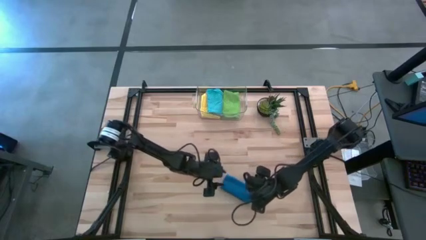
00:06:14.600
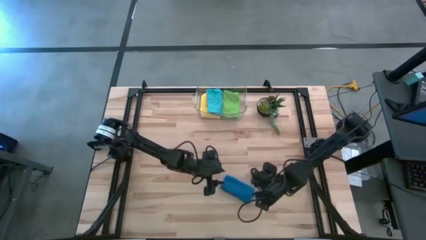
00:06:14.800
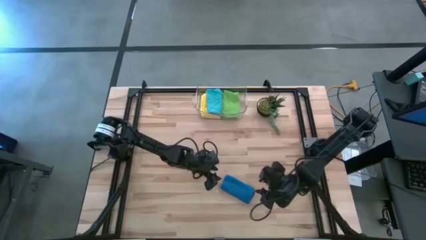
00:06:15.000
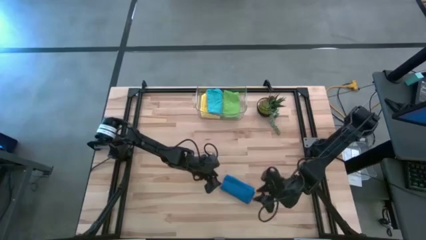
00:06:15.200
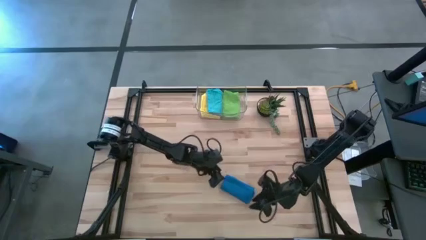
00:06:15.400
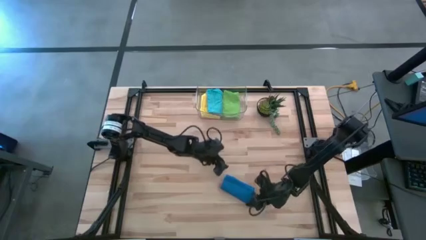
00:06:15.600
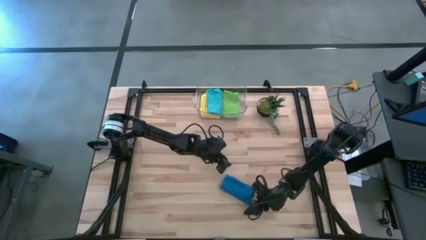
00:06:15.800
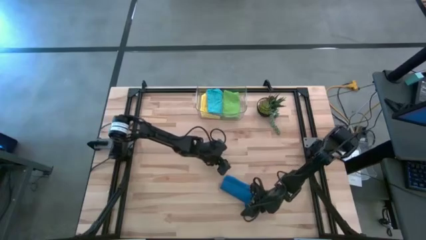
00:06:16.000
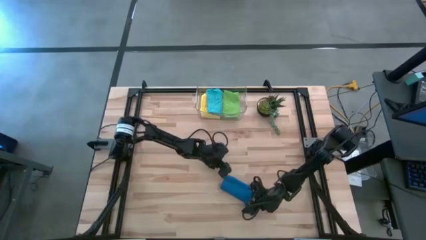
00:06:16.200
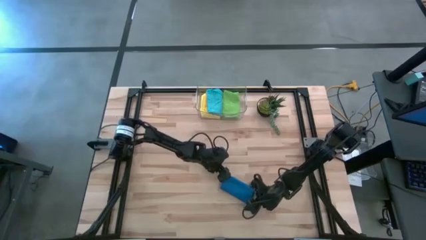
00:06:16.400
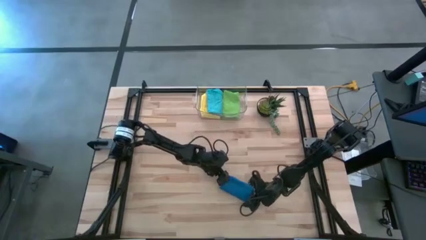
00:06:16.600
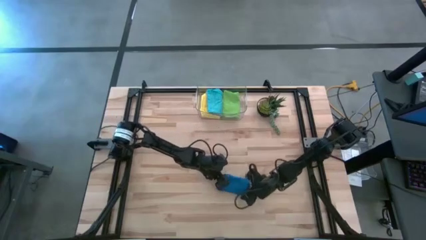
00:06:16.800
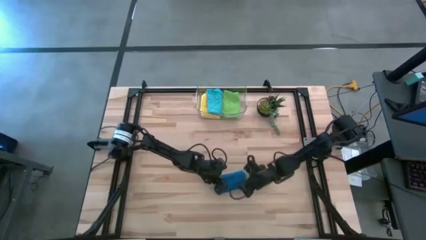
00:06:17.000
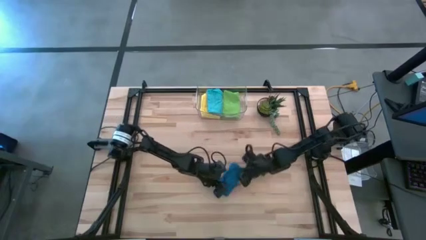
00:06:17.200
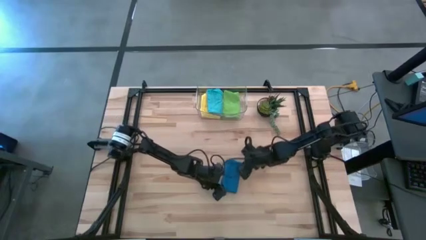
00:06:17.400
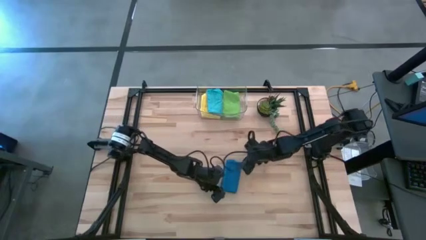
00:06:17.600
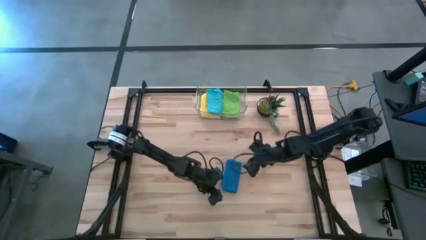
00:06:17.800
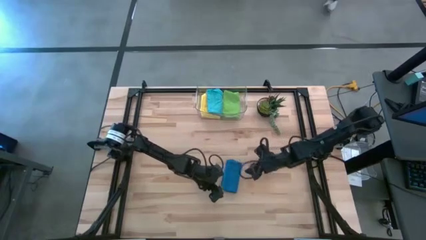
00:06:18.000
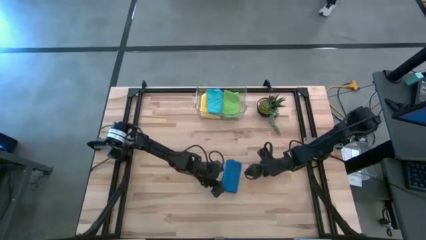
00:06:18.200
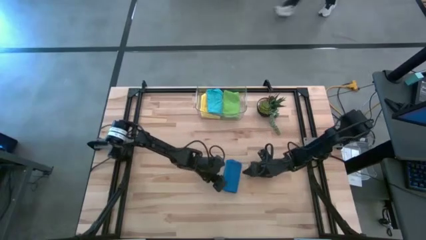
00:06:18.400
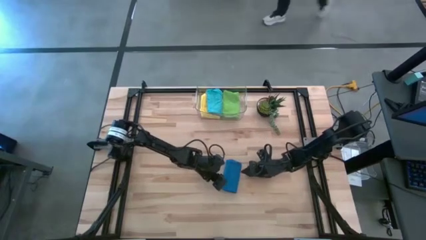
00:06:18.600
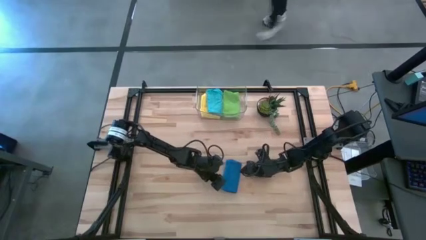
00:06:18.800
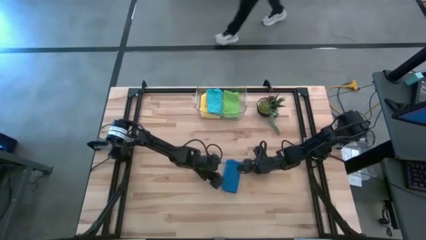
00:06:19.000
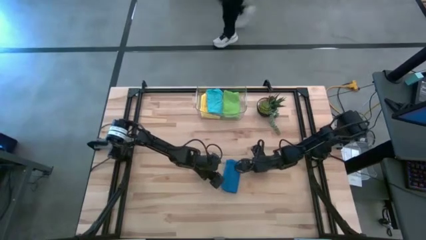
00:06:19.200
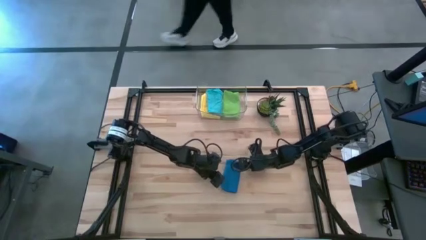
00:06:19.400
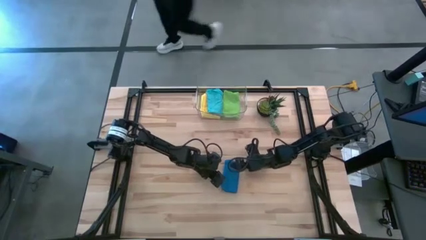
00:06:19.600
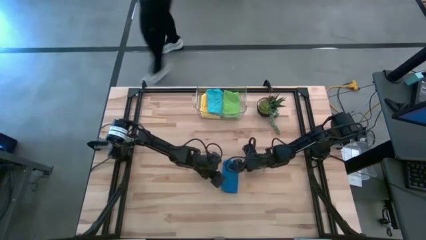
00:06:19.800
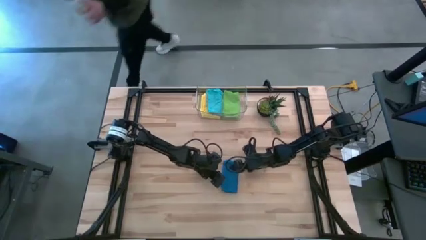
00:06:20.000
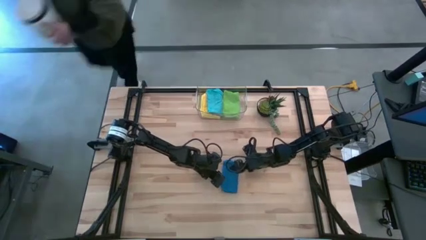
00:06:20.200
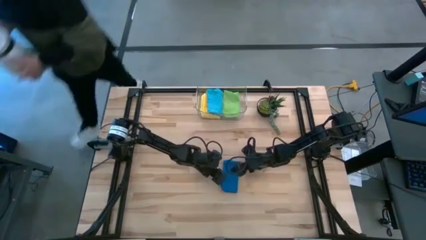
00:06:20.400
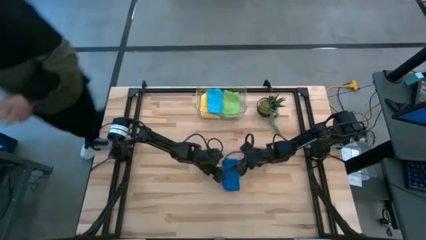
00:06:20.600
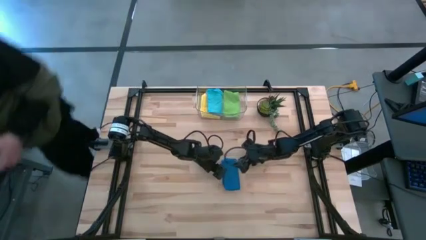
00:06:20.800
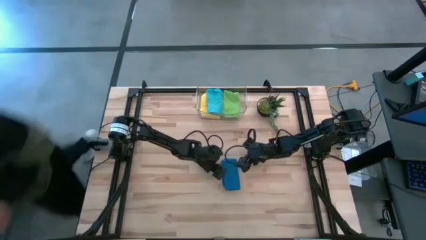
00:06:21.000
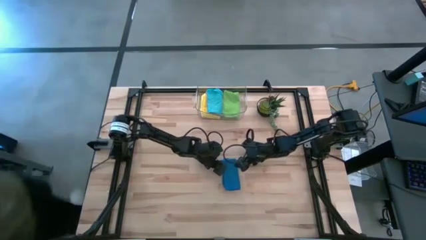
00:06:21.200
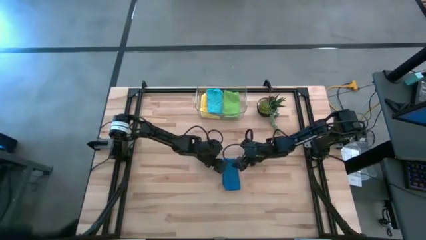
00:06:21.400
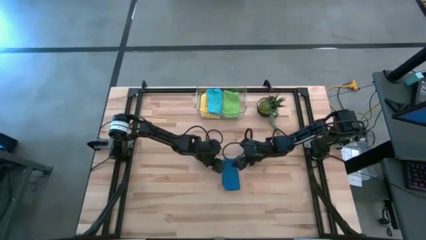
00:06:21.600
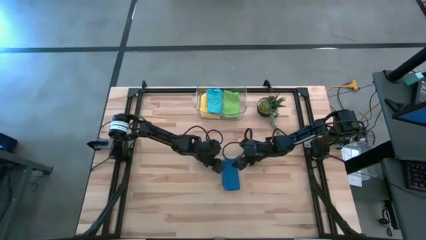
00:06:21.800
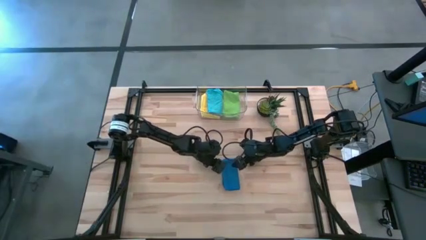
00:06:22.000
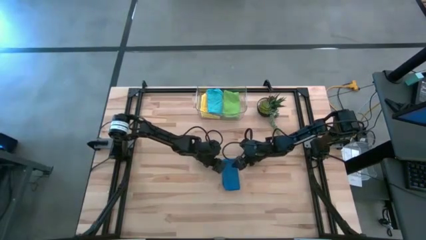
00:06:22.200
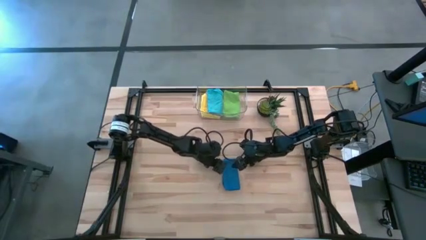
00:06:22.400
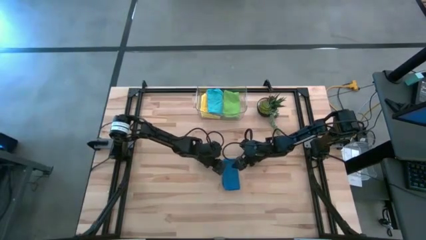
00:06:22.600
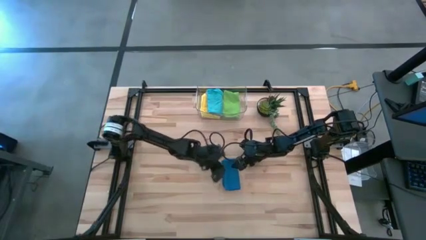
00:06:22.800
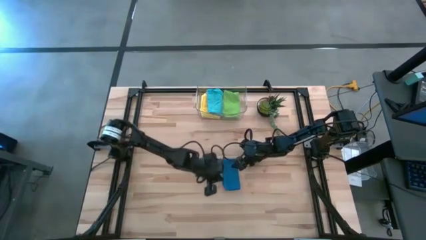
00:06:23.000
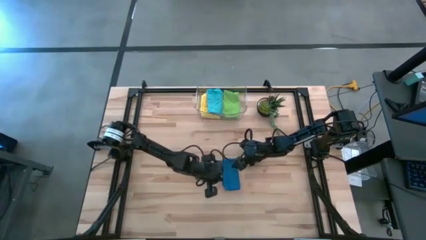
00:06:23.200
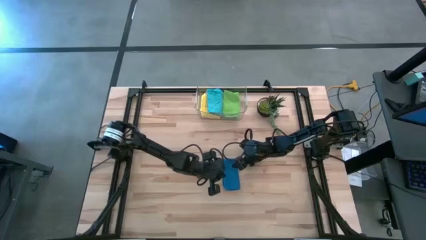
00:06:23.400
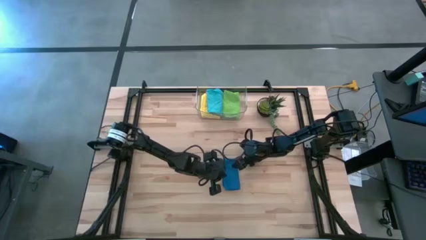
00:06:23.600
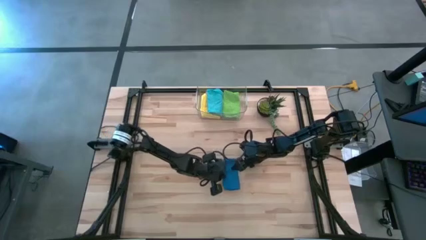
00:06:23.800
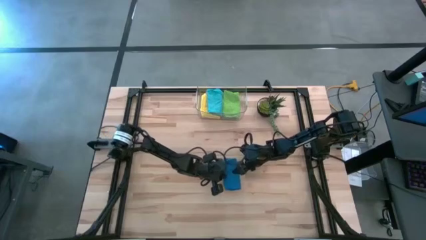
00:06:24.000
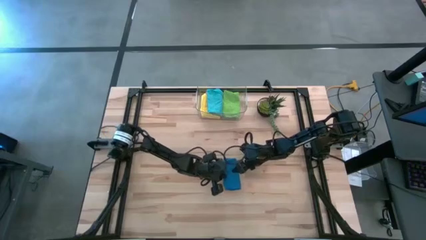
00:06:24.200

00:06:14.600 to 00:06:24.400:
Task: Fold microfiber towels
Put the dark blue microfiber towel into the transparent bin

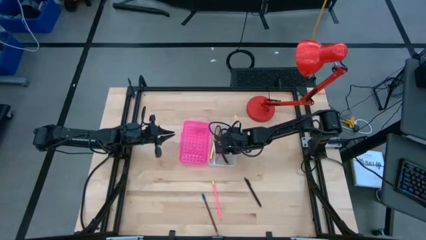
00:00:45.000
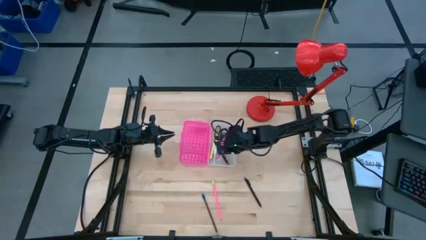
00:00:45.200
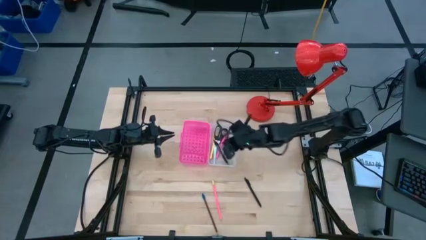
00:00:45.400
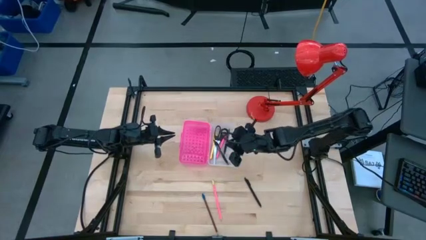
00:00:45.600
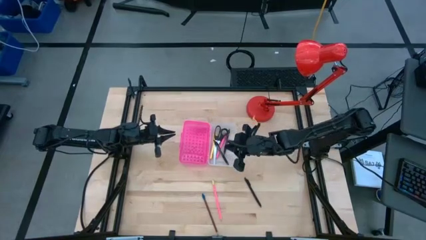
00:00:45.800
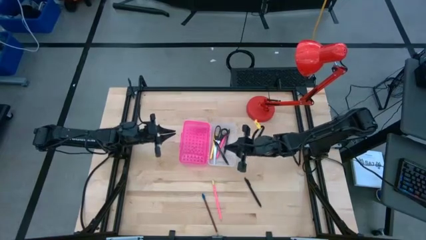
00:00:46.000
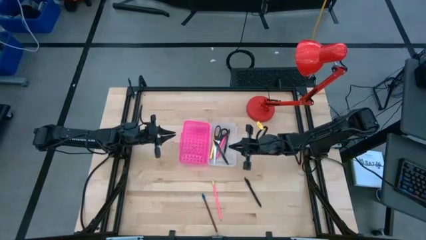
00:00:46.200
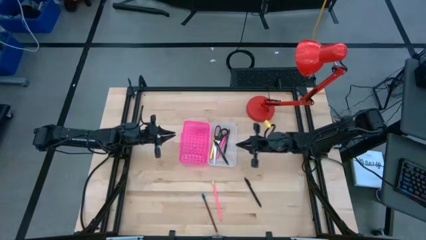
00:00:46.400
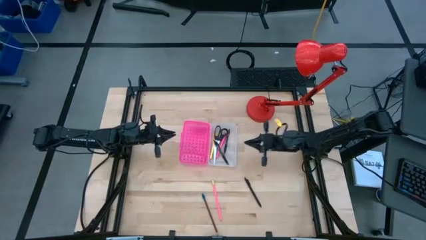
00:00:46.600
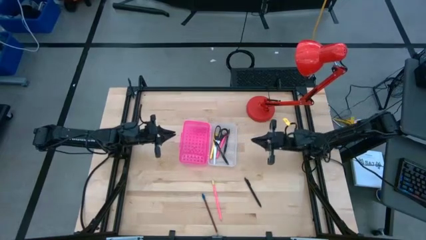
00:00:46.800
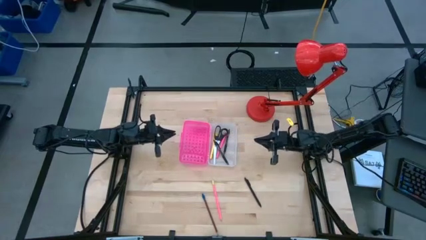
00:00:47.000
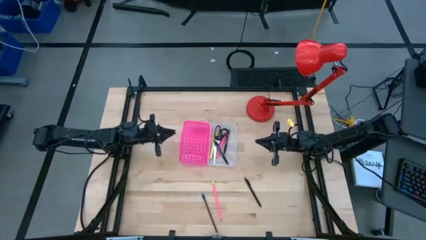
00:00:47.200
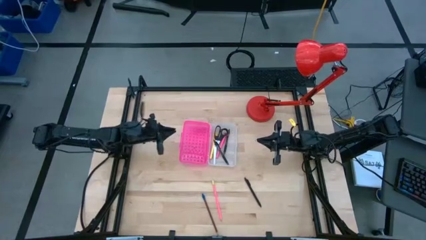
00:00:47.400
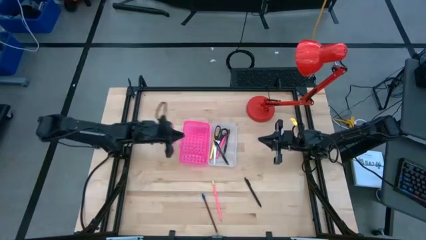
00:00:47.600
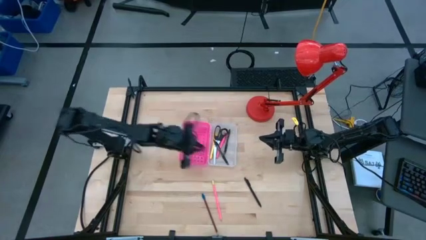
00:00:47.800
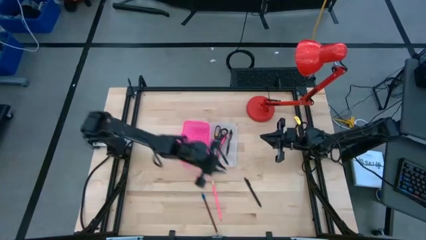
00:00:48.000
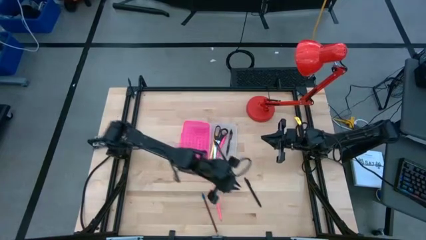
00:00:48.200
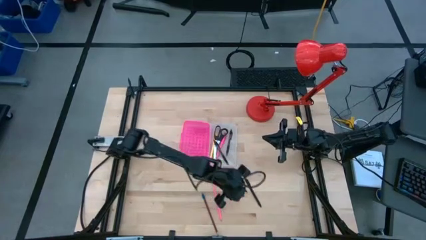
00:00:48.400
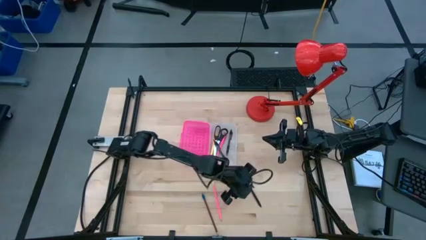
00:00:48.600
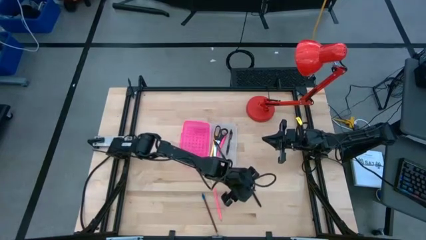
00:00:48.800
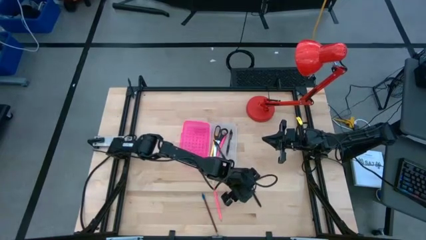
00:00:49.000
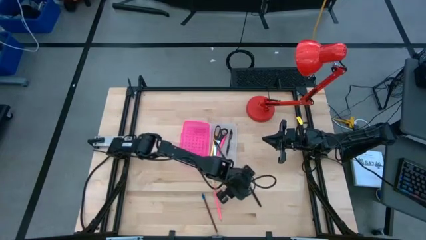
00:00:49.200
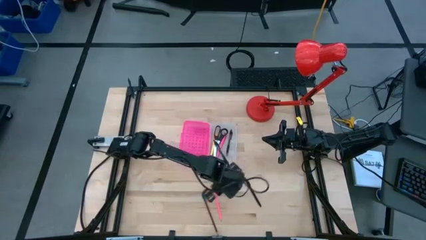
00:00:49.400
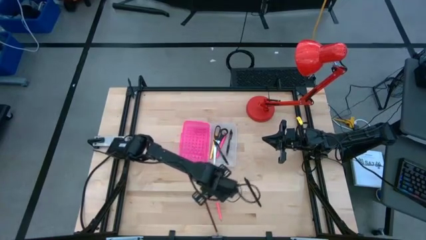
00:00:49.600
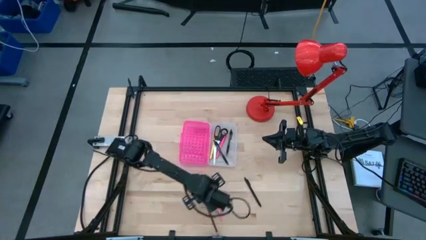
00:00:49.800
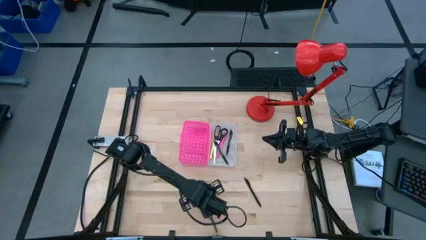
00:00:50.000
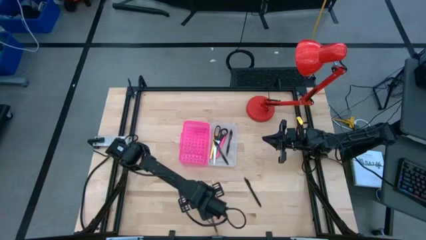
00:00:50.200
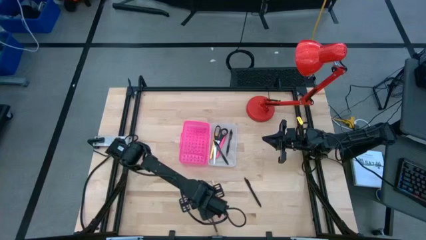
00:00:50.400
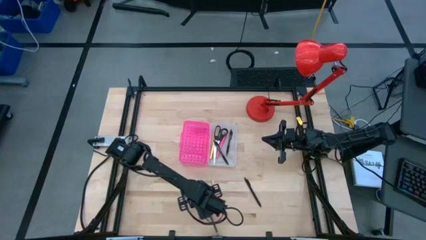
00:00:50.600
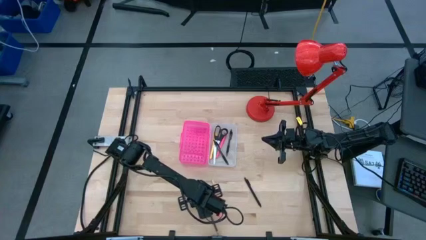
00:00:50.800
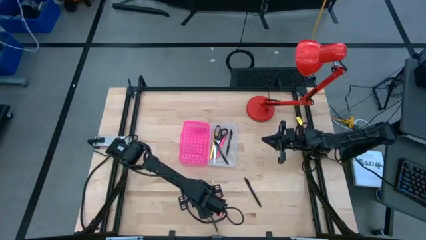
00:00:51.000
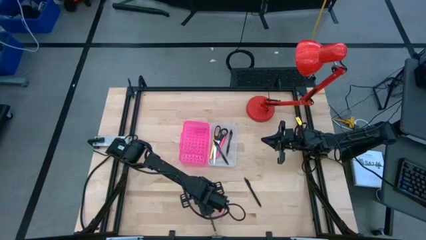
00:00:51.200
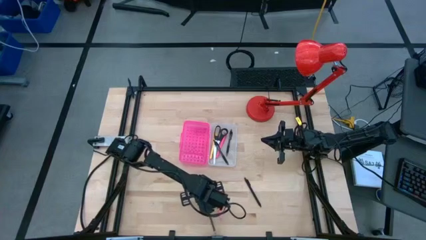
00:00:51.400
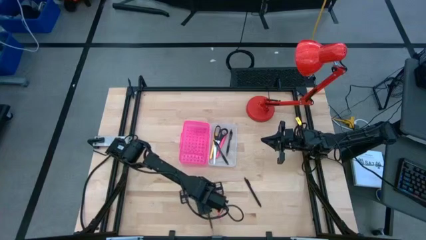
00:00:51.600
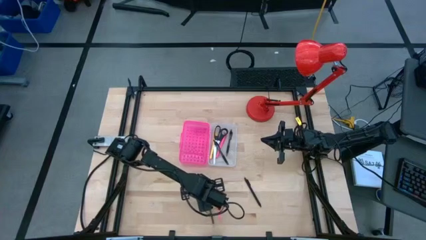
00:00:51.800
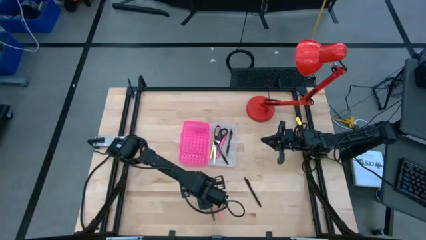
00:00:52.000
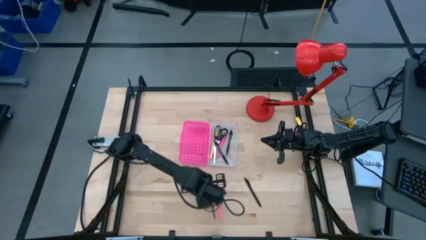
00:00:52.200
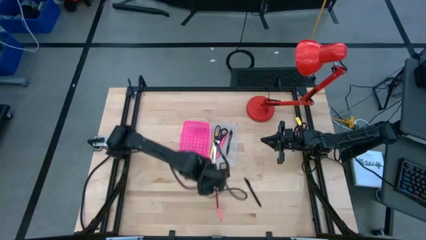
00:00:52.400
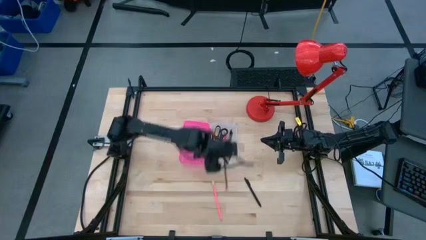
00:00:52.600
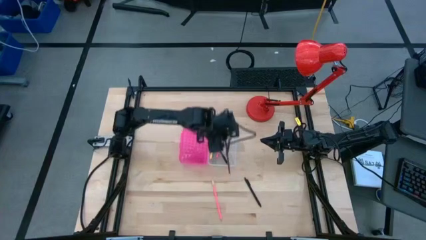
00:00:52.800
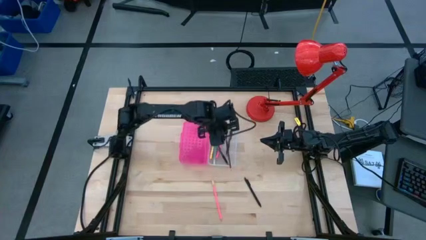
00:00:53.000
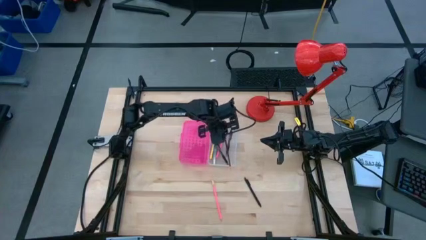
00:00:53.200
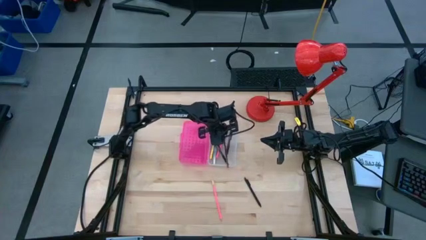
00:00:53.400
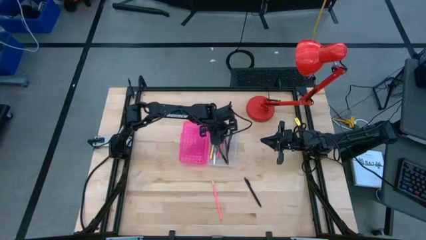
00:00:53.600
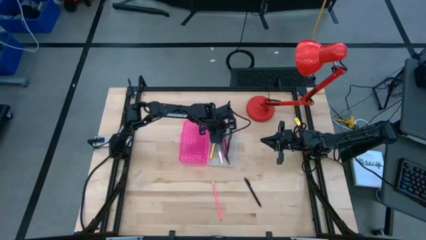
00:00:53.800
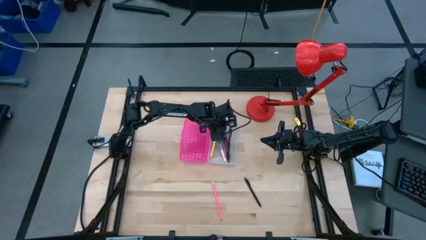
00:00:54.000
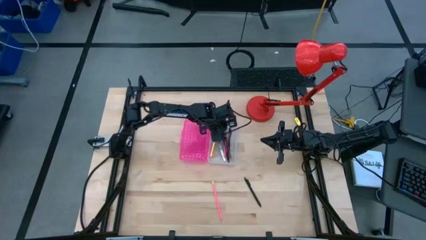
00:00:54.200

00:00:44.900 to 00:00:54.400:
Task: Pick & place school supplies into a supply box
Put the brown pencil into the supply box
